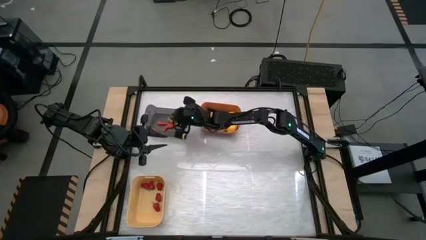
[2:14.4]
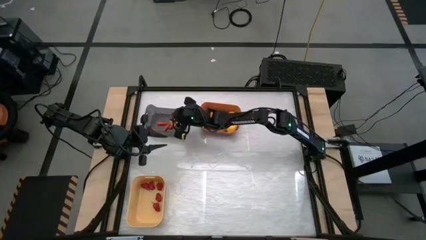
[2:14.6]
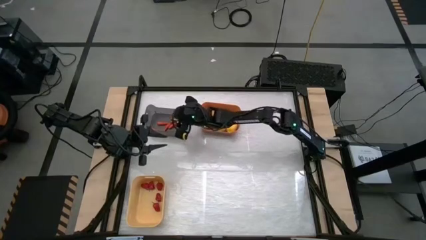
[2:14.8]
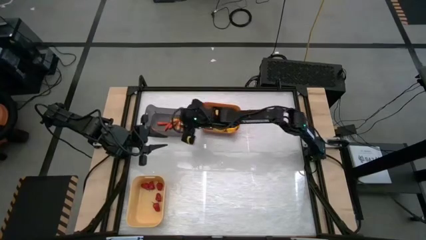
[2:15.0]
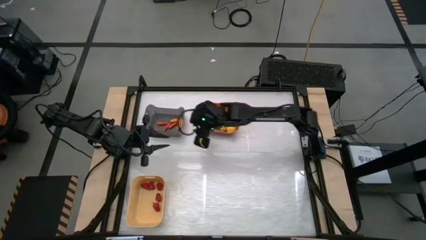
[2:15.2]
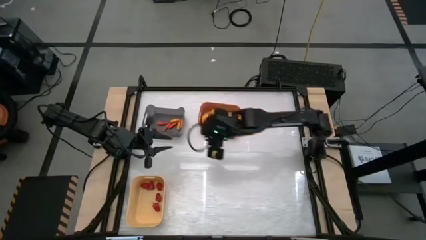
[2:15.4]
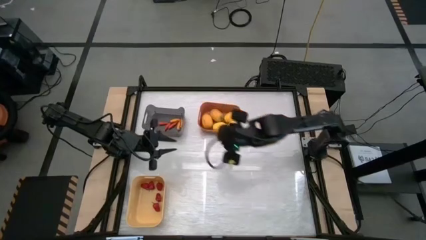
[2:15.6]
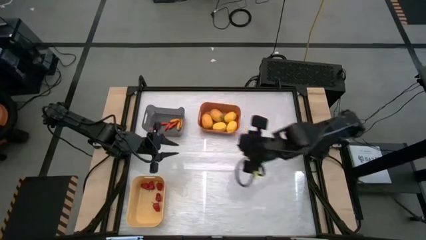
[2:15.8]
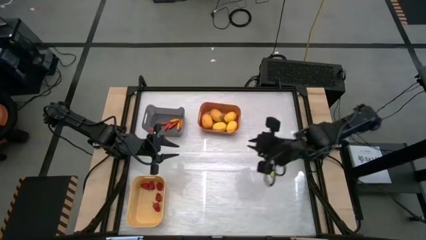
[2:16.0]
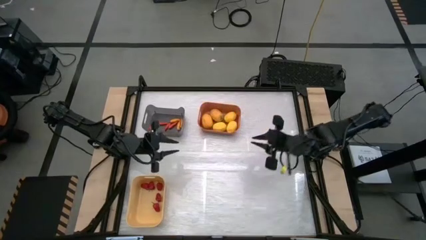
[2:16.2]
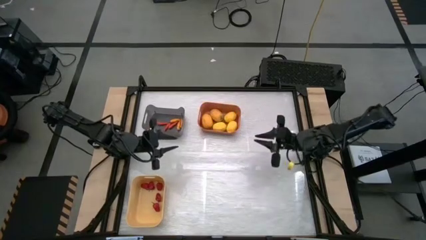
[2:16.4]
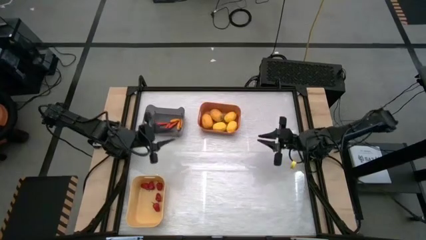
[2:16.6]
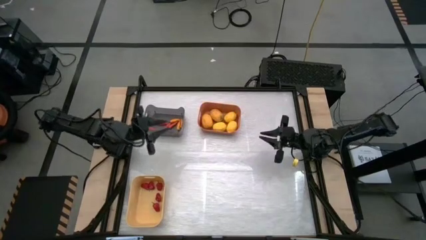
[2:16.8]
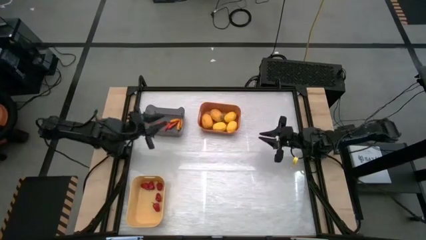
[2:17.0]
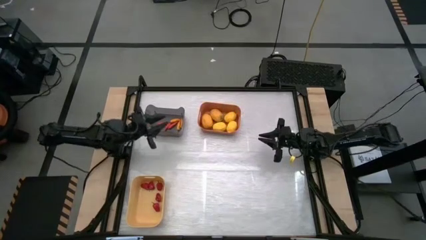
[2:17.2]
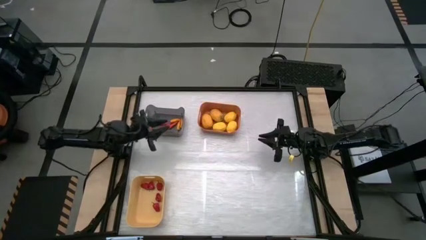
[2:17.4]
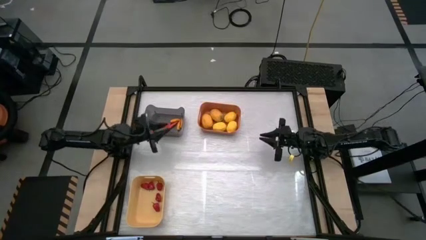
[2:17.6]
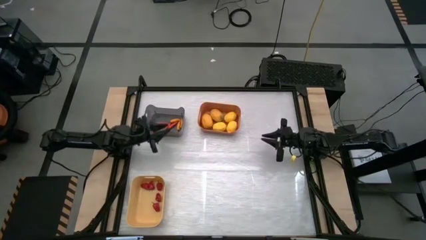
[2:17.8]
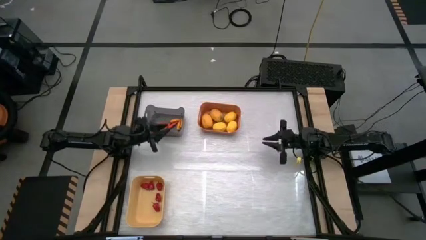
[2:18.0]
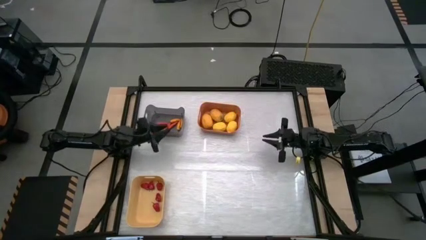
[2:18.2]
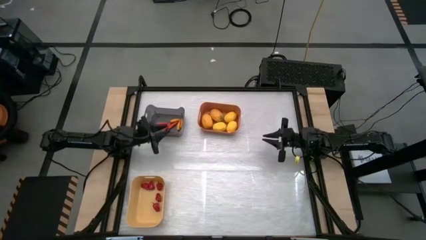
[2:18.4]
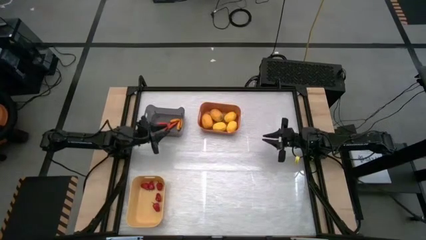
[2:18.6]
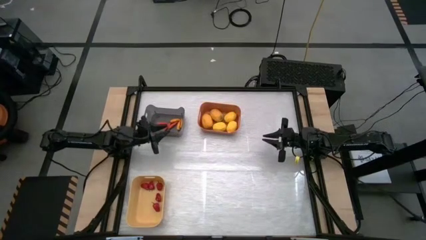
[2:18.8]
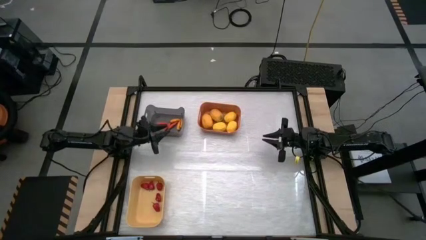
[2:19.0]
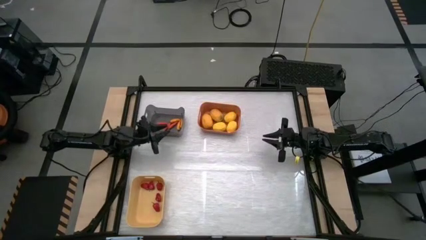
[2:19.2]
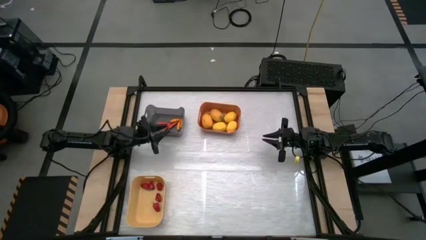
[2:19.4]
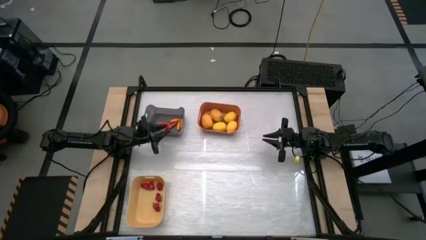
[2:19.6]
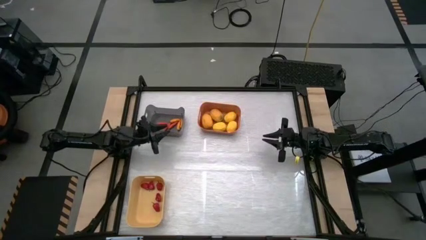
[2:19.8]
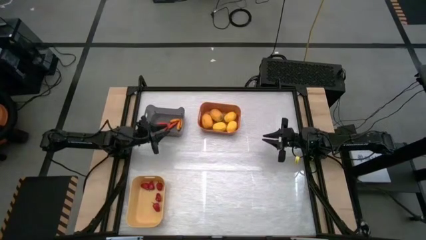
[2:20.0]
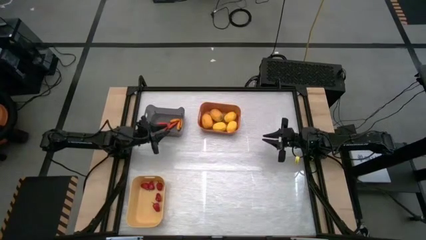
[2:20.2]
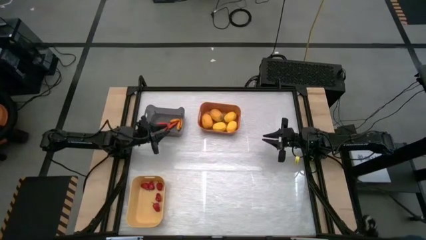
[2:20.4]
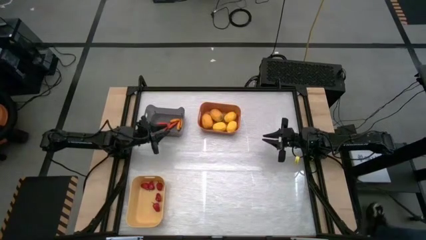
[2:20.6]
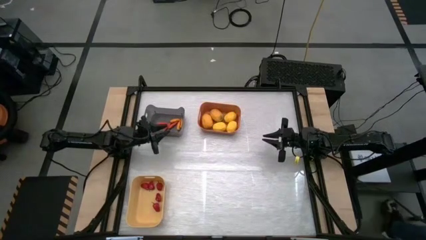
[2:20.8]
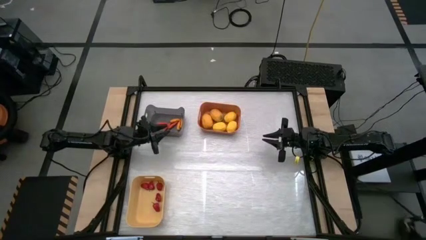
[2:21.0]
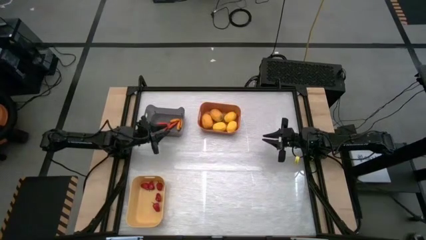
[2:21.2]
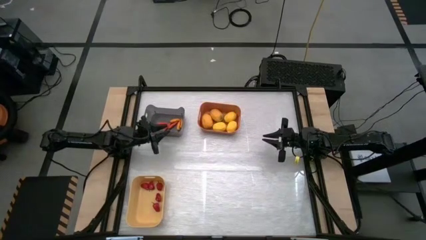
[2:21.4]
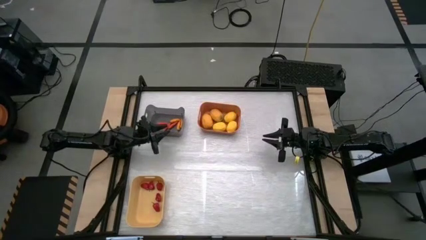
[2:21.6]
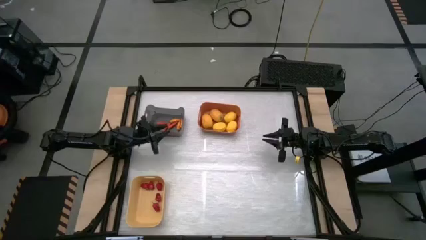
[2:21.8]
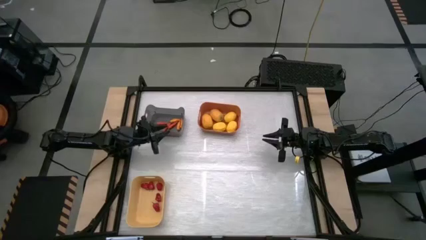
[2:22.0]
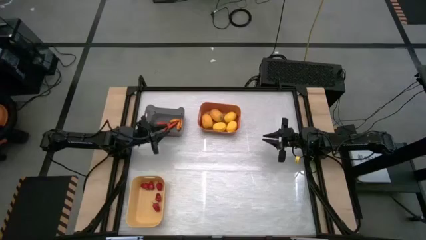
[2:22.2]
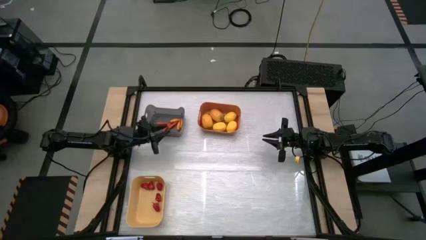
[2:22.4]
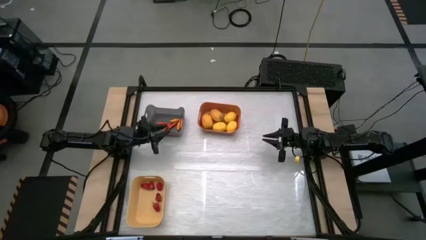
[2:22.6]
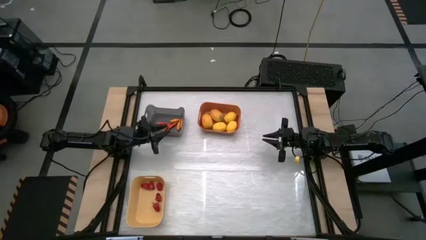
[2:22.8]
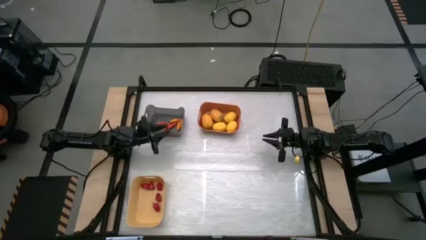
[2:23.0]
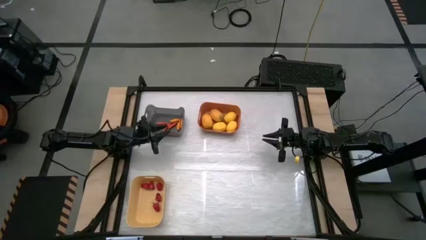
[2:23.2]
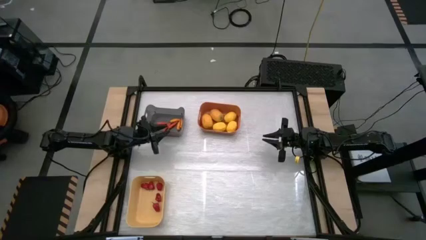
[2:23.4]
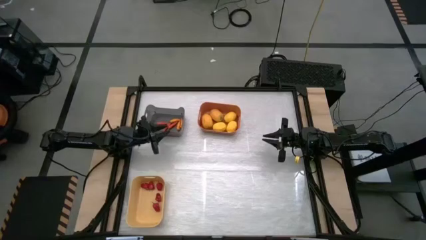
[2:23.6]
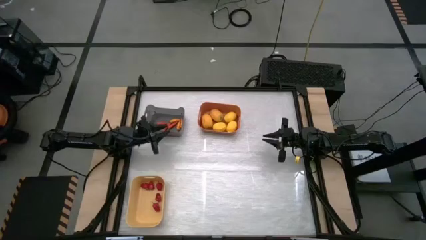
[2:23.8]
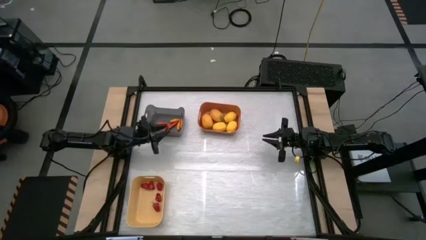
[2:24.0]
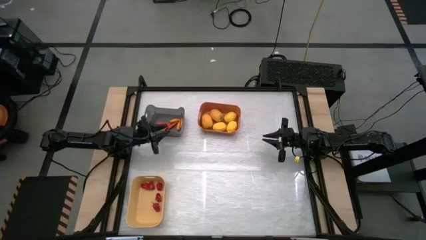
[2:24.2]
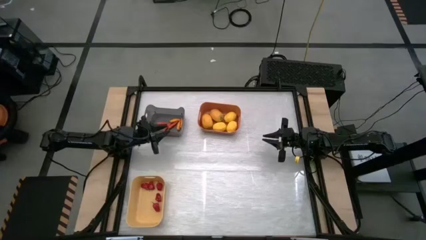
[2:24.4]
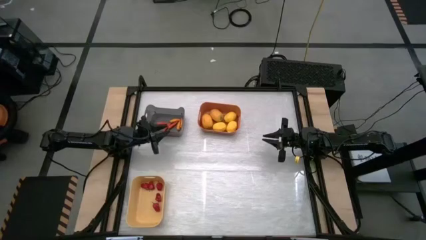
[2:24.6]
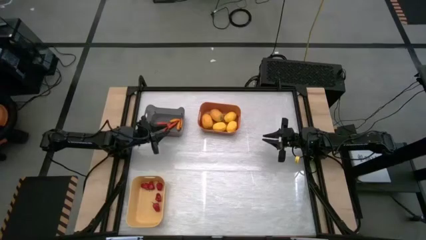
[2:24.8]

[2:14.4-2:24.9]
Task: Sort produce into baskets
Return to Home Position

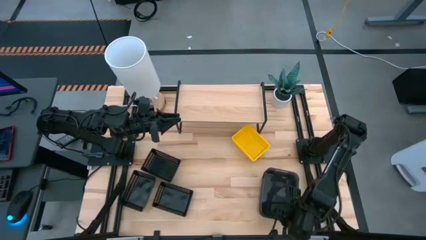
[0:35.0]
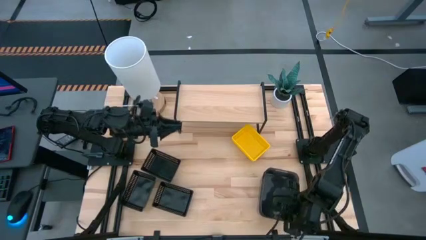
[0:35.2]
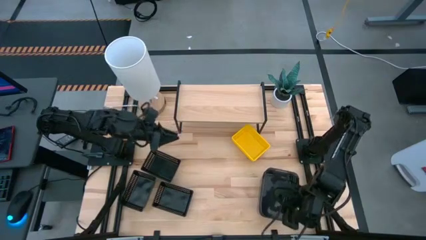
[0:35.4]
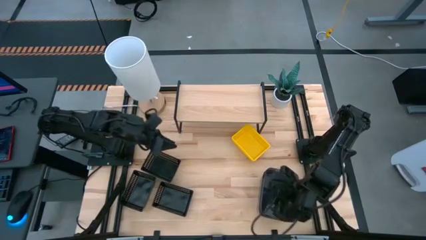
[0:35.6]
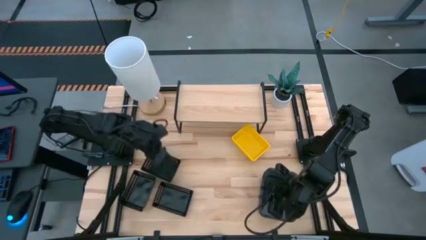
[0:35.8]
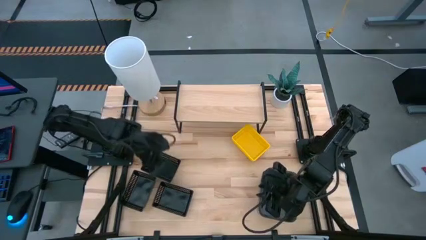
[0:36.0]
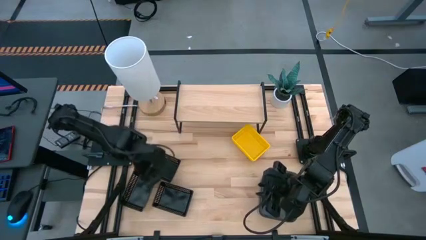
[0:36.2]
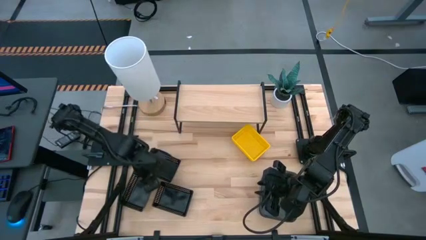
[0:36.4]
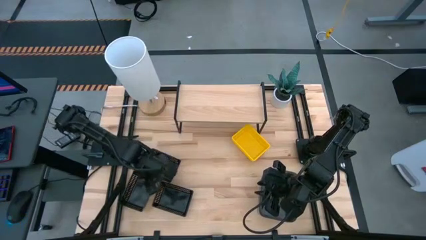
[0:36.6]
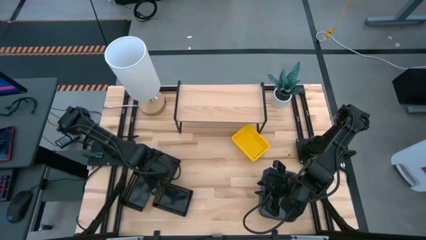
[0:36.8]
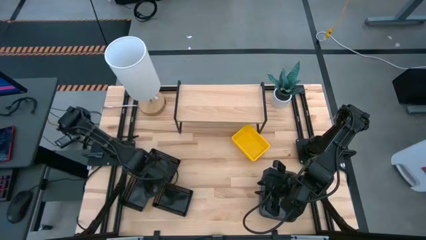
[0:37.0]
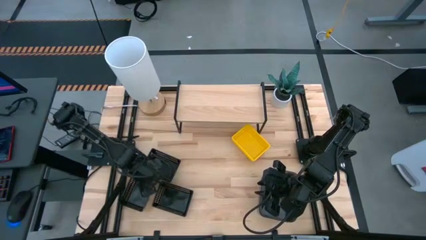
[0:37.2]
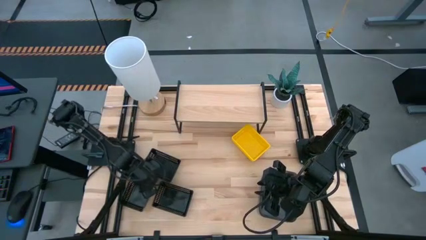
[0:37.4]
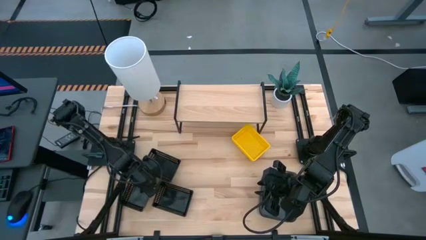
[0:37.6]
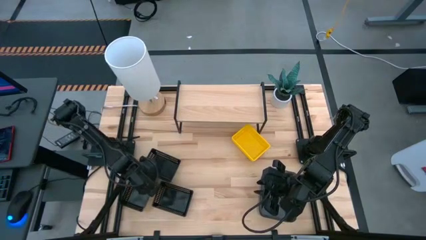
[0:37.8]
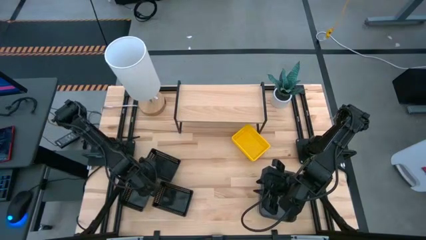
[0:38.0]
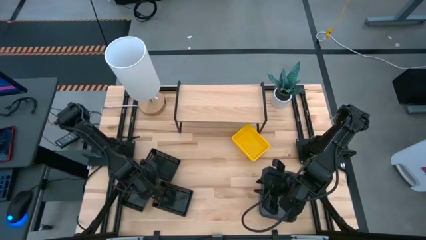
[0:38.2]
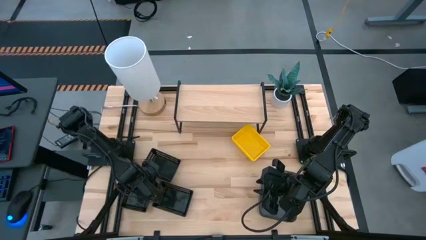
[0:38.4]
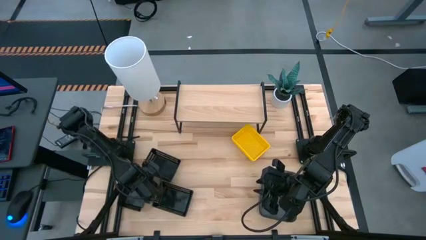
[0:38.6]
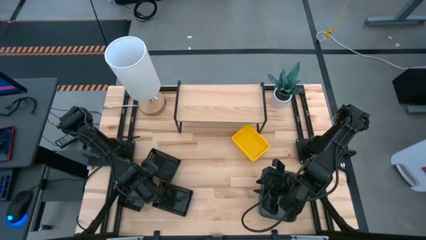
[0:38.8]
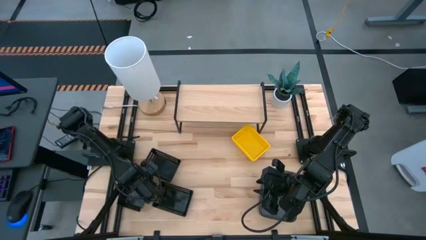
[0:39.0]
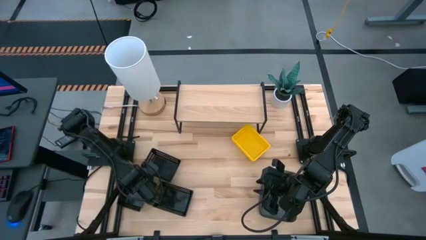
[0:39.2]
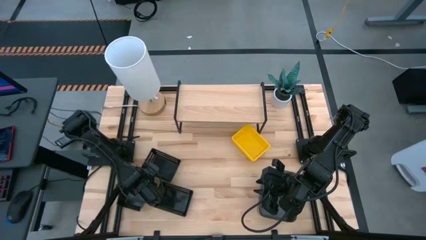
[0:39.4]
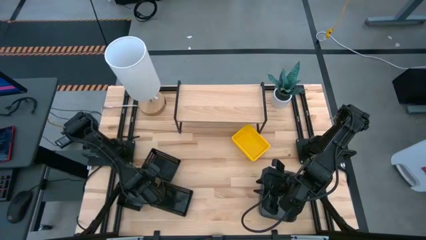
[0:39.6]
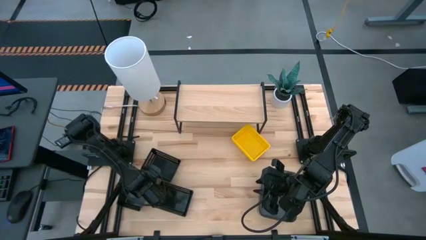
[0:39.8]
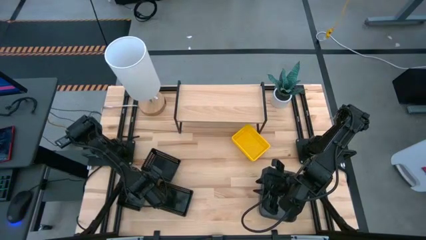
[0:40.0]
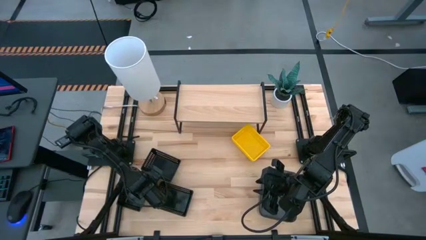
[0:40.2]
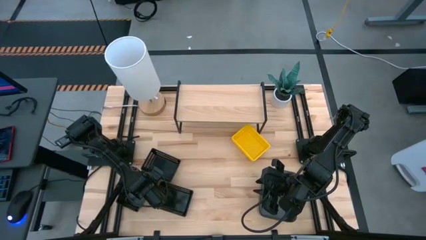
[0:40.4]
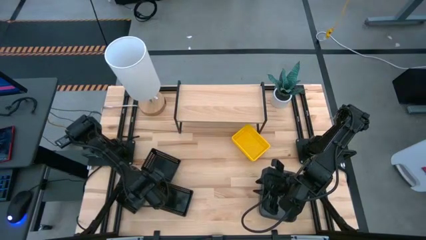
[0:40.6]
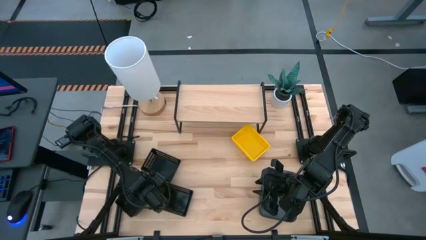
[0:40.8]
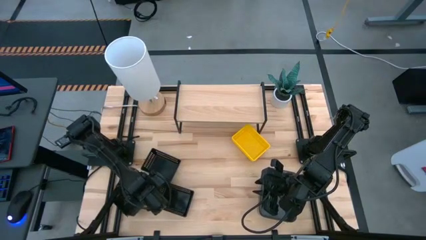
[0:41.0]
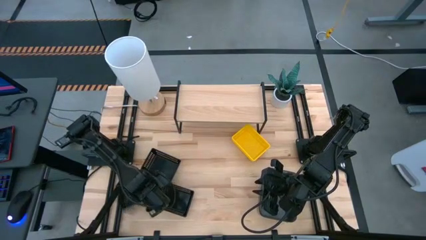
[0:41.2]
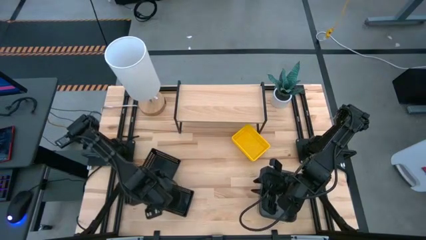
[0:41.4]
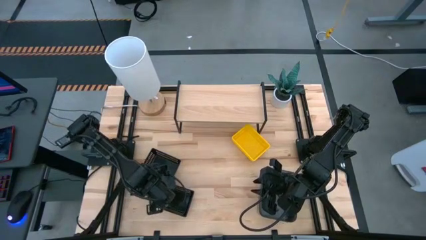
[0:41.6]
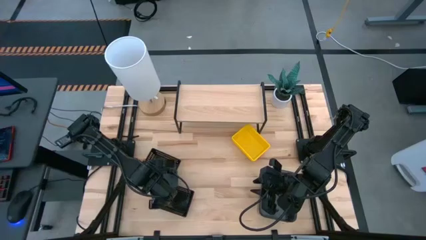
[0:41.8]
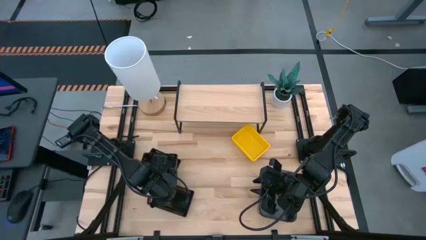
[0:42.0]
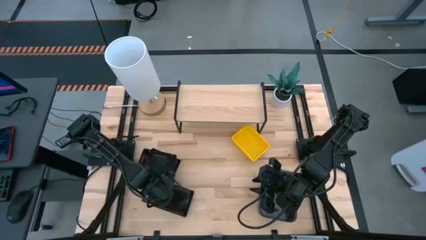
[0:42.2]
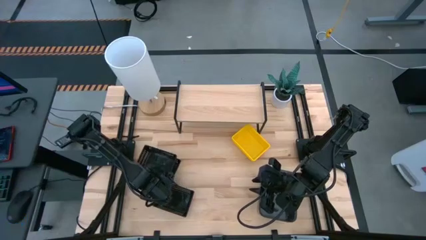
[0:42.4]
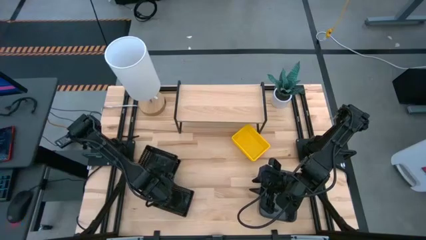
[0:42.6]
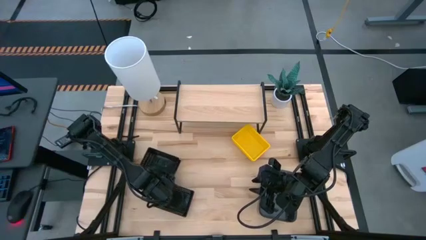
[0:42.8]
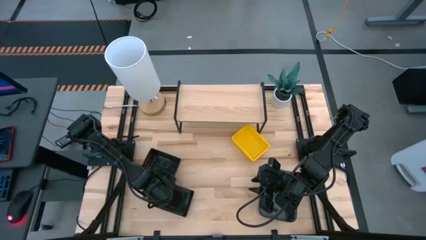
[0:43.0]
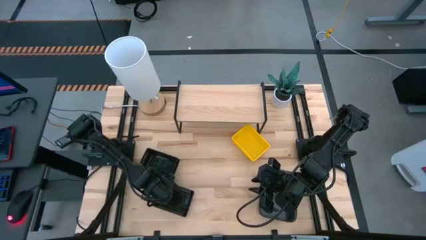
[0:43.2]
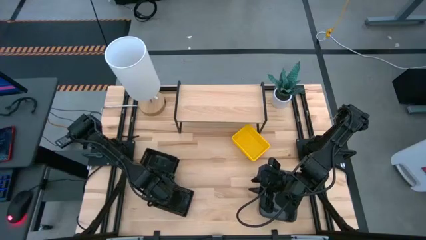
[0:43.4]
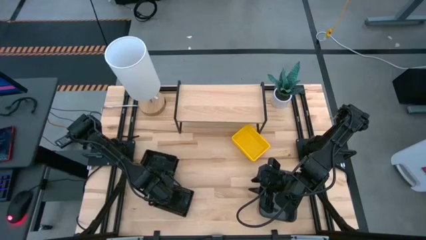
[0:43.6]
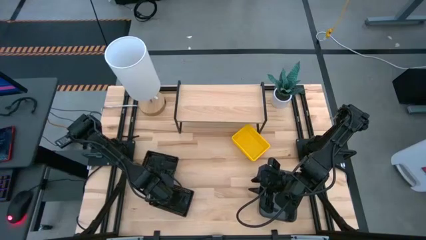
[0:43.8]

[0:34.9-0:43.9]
Task: Stack baskets on shelf by color
Stack the bottom left black bin on top of the top black bin
